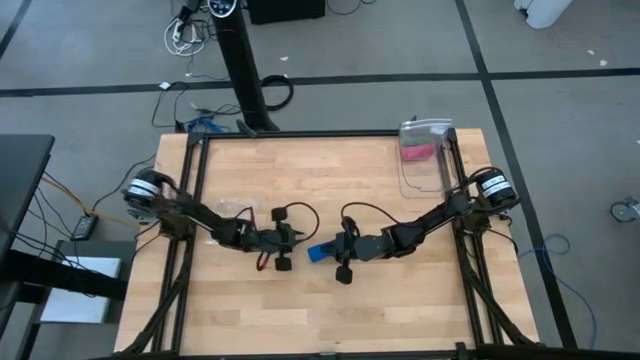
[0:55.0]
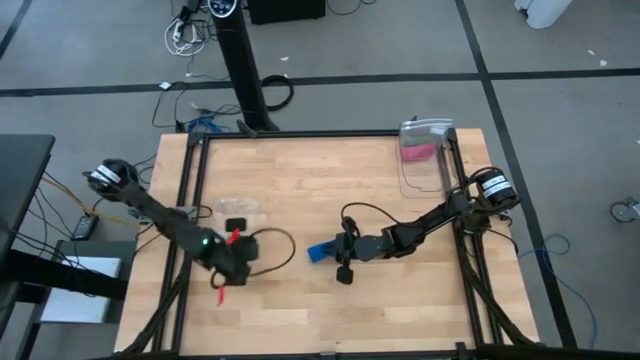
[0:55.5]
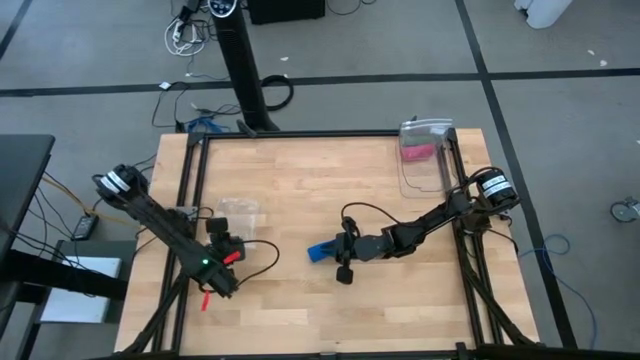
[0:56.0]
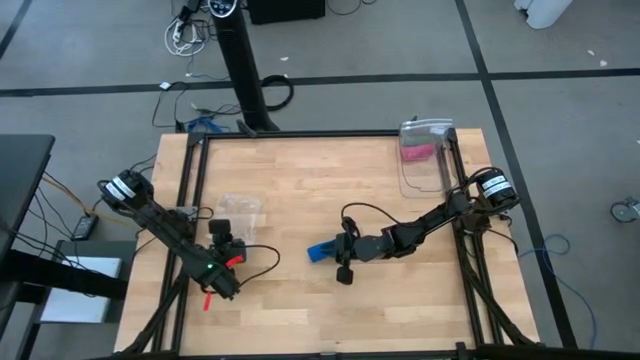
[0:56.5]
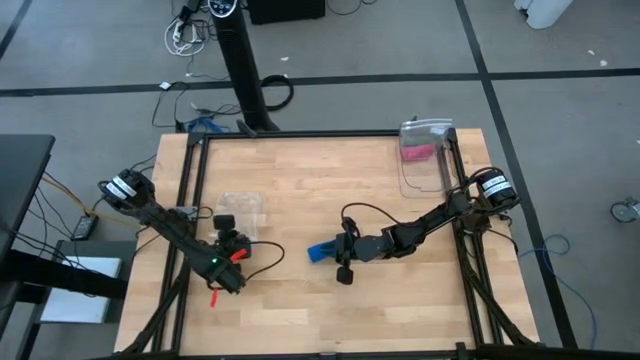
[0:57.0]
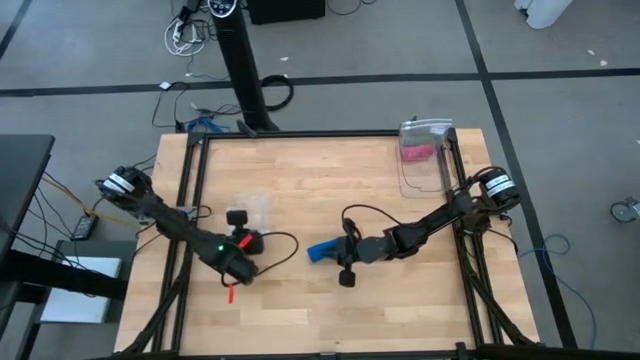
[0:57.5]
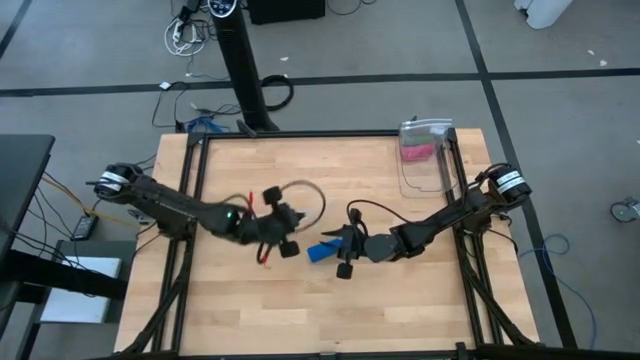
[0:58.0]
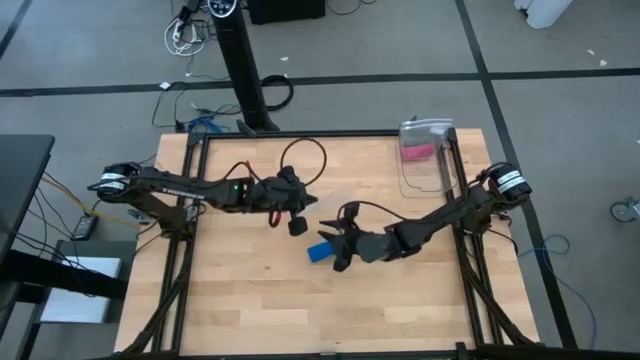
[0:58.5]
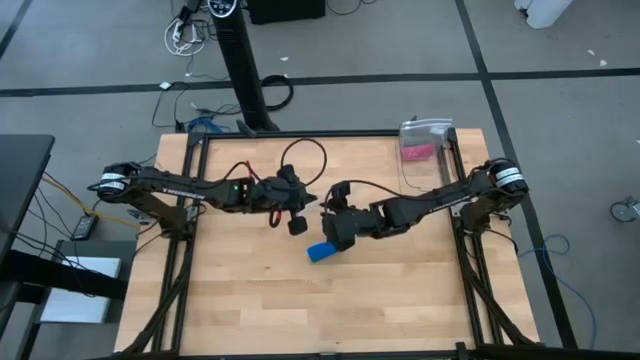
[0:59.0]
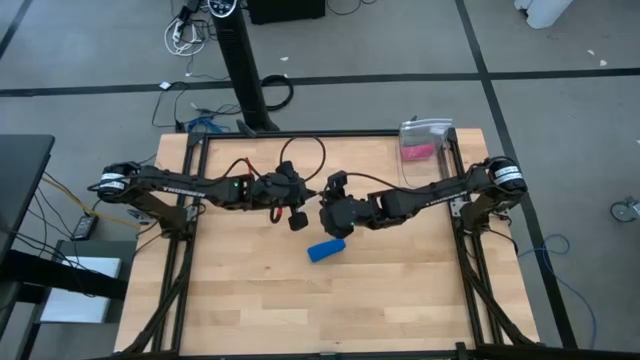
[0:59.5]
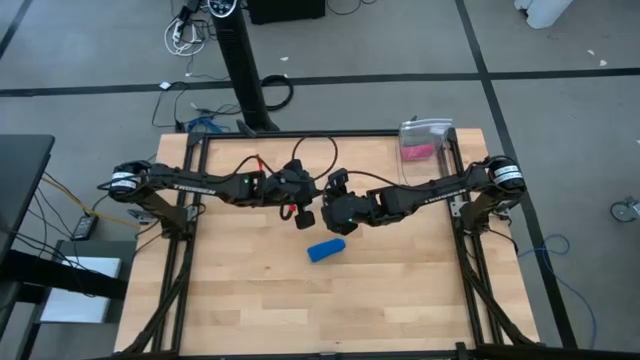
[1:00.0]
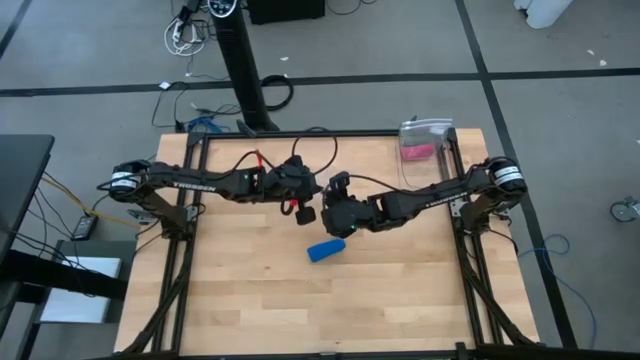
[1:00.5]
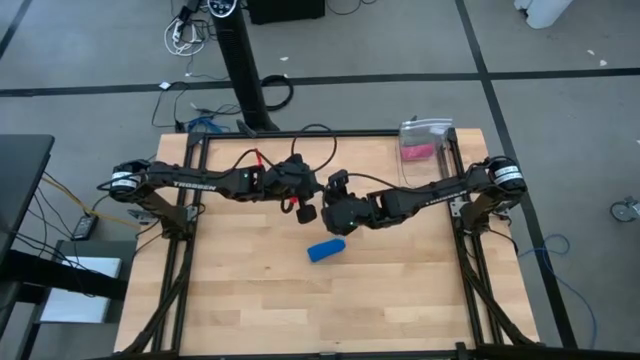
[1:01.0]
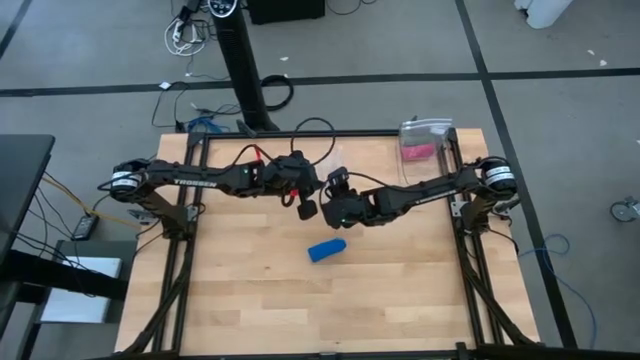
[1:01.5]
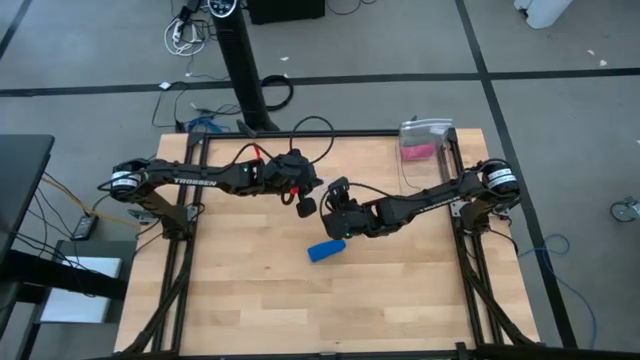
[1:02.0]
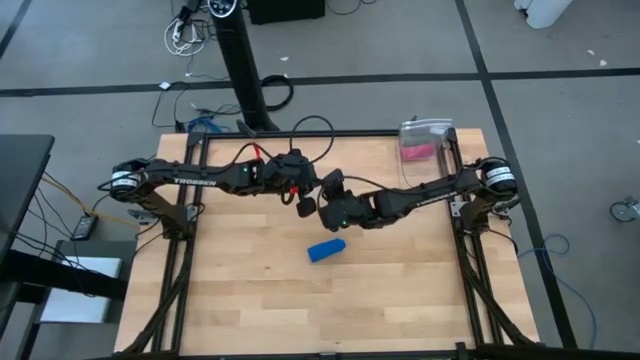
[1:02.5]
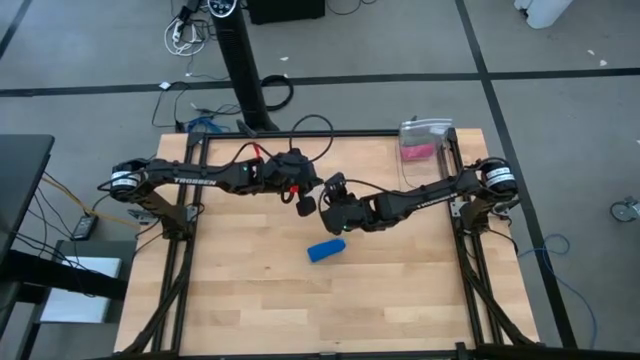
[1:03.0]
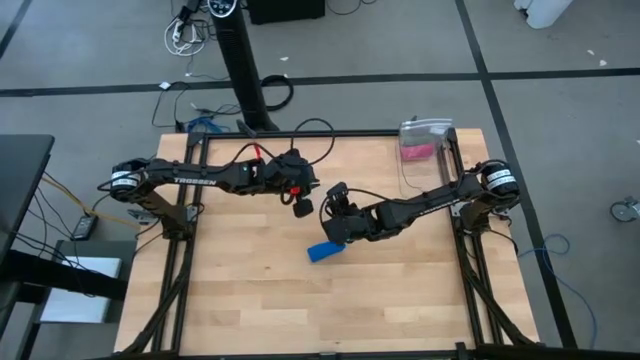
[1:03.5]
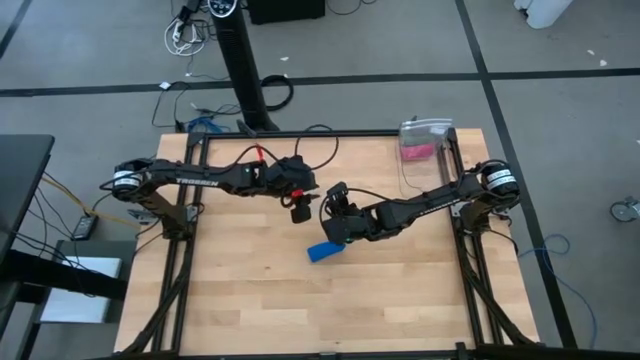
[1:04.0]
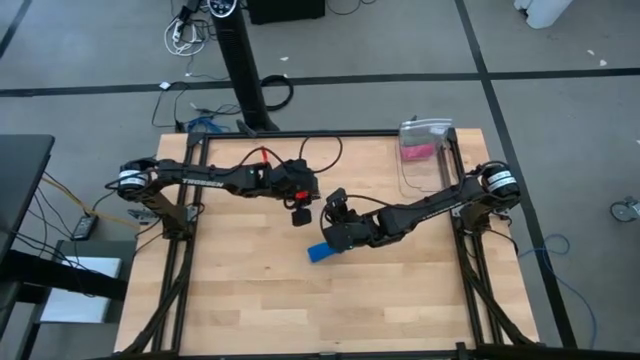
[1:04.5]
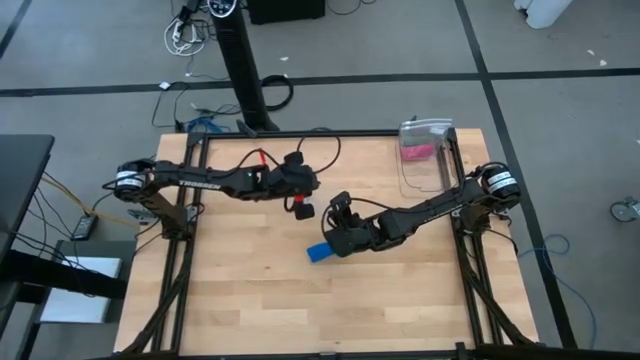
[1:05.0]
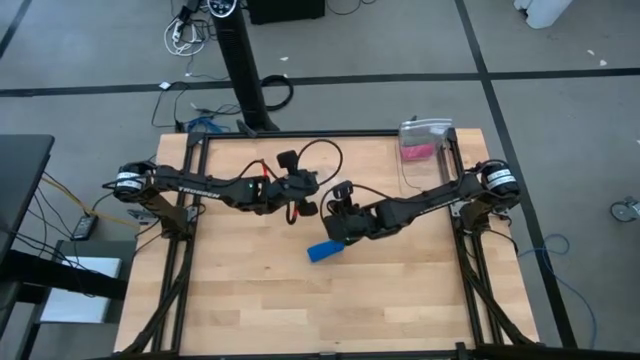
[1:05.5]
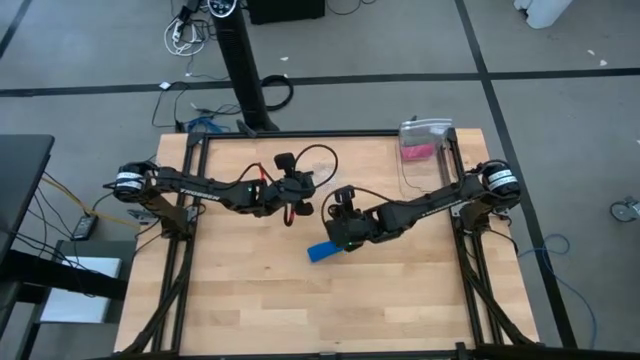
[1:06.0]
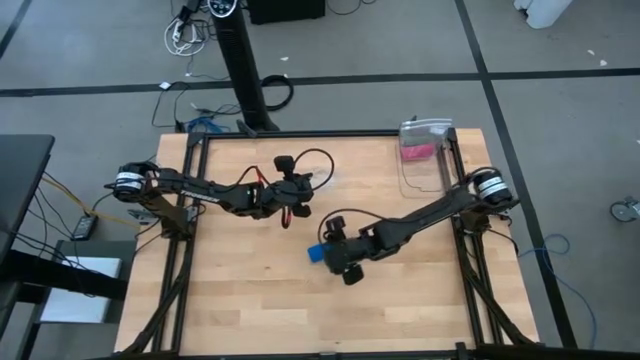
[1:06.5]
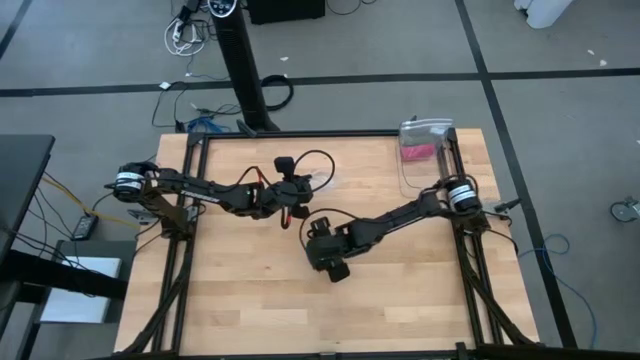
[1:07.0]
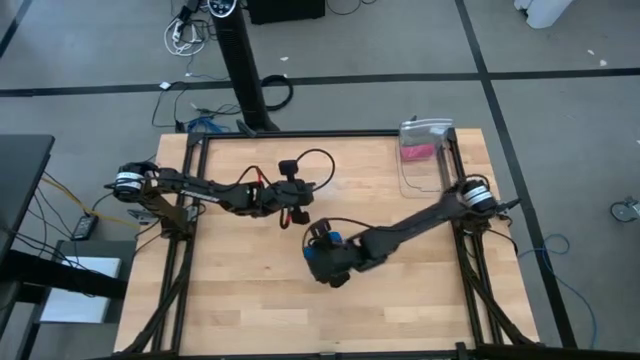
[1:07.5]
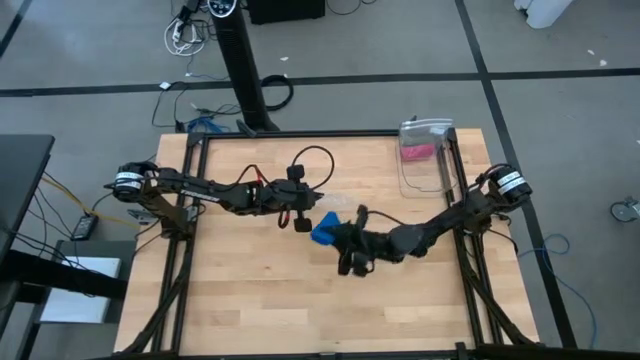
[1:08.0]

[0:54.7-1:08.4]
Task: Roll bandage
Put the blue rolled bandage into the transparent zip bag

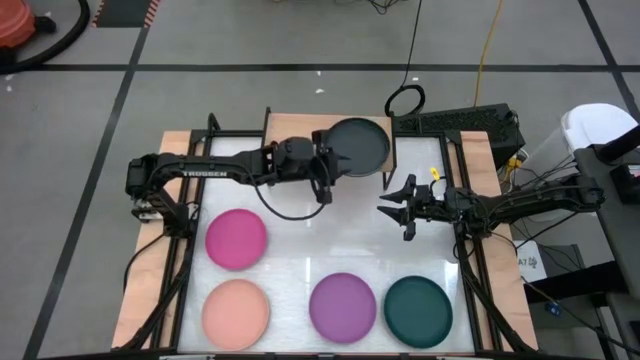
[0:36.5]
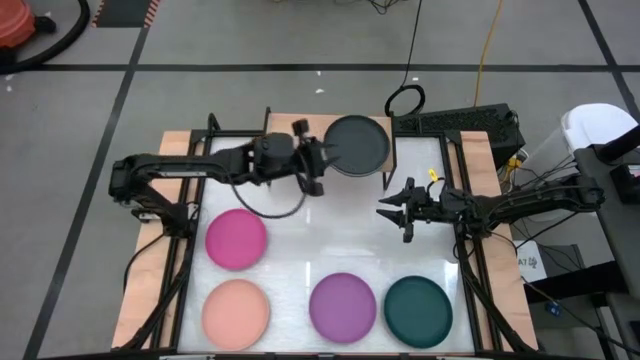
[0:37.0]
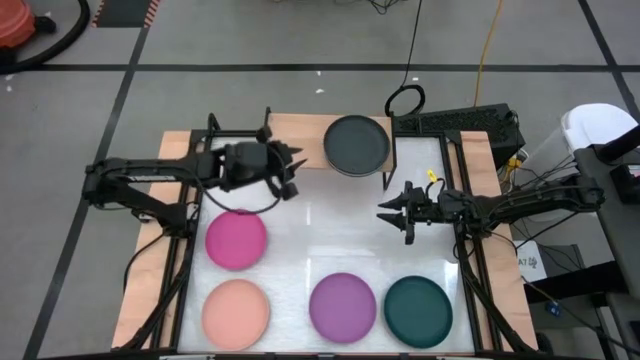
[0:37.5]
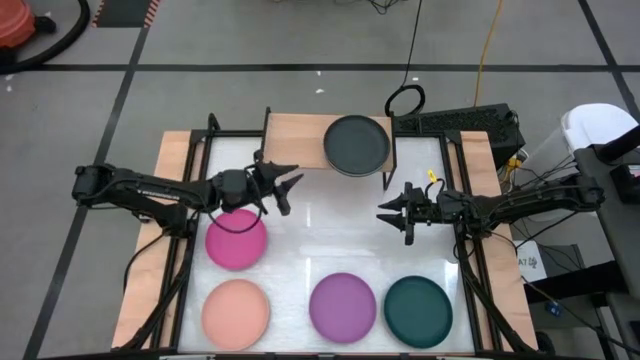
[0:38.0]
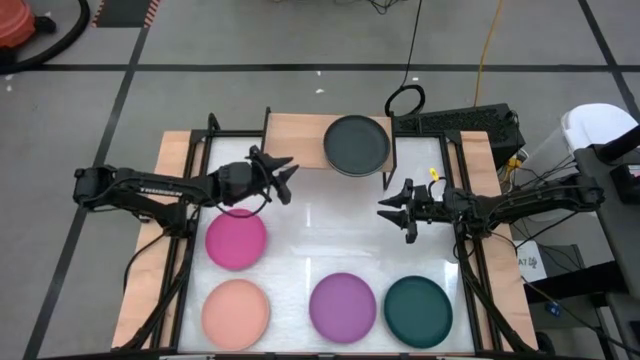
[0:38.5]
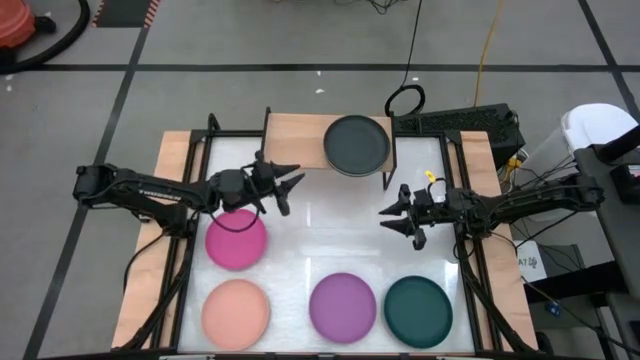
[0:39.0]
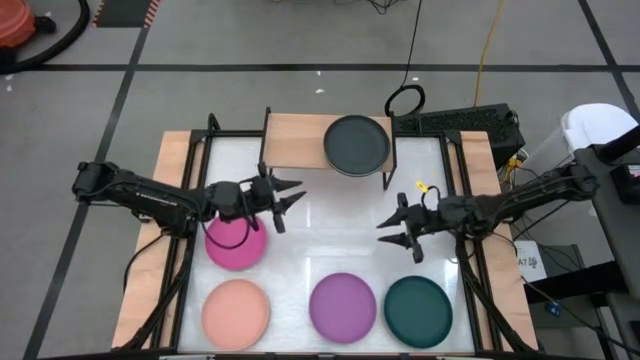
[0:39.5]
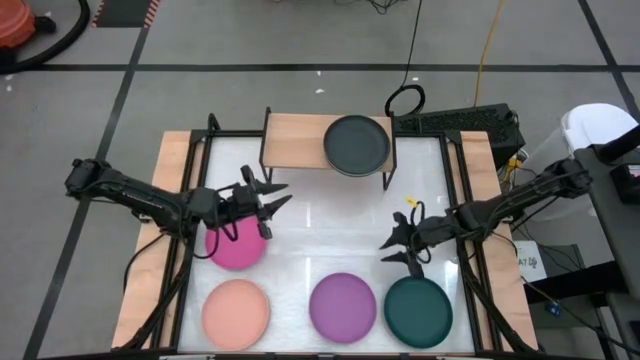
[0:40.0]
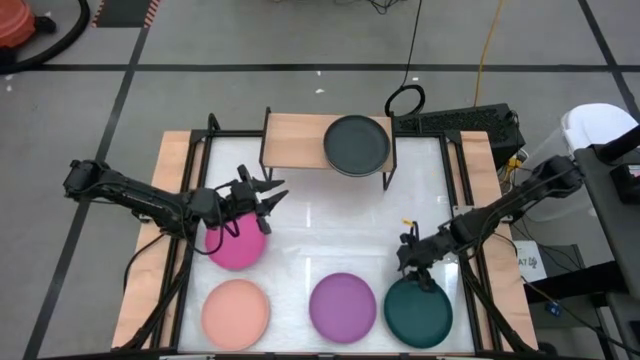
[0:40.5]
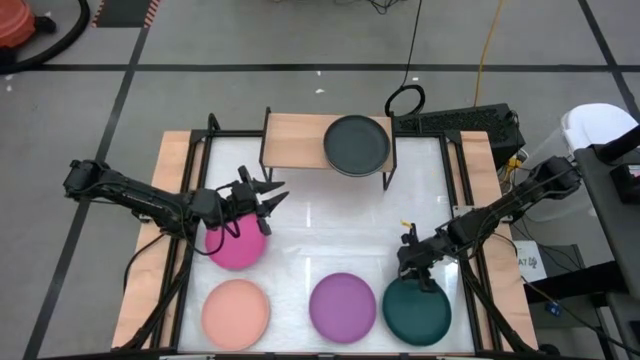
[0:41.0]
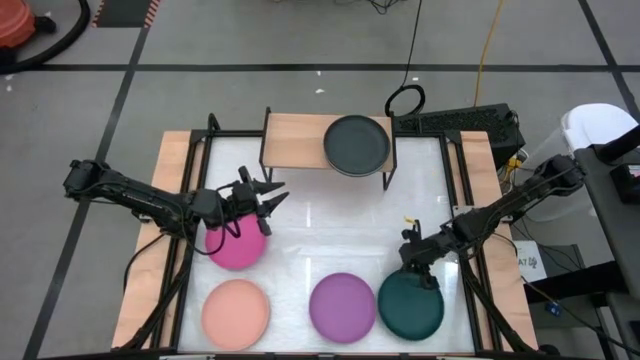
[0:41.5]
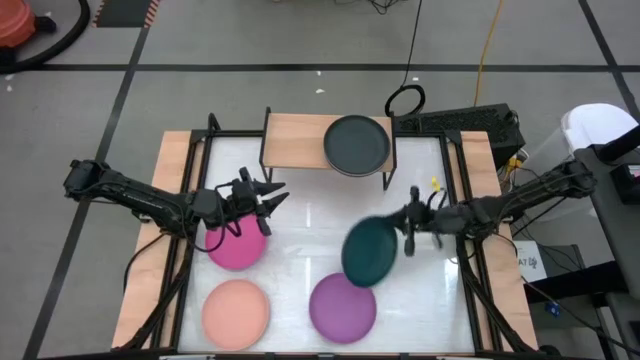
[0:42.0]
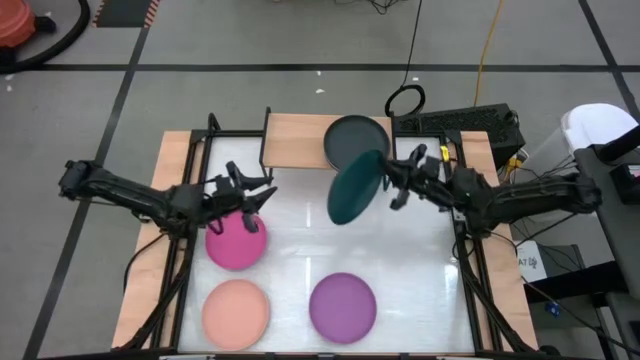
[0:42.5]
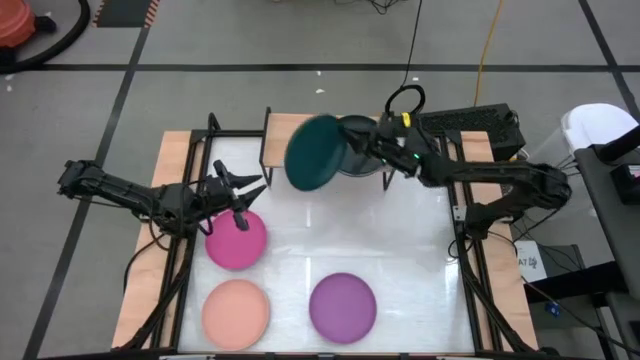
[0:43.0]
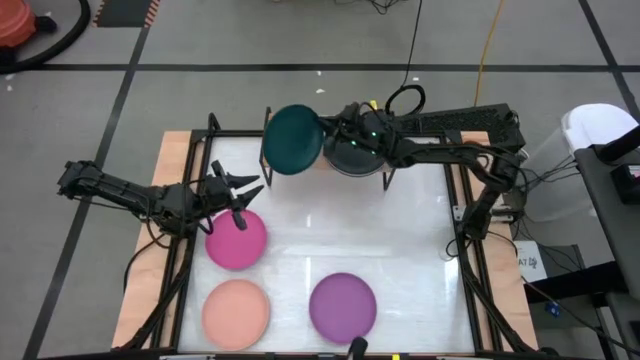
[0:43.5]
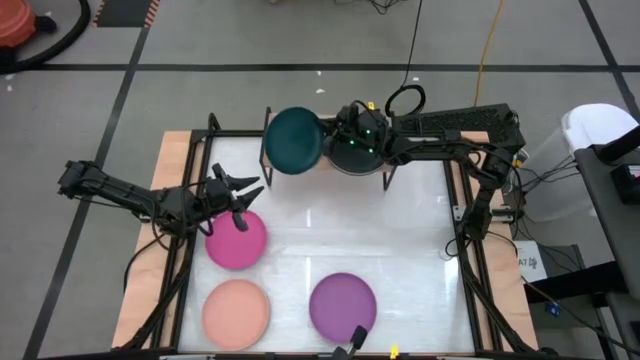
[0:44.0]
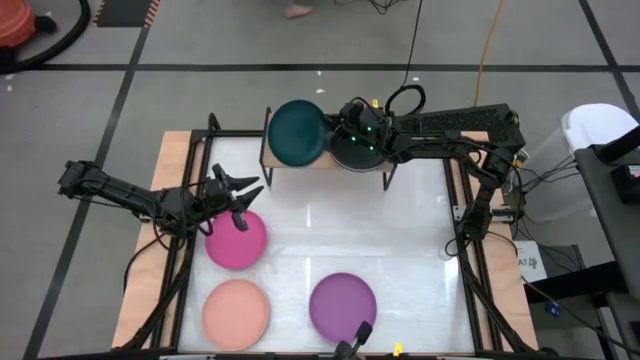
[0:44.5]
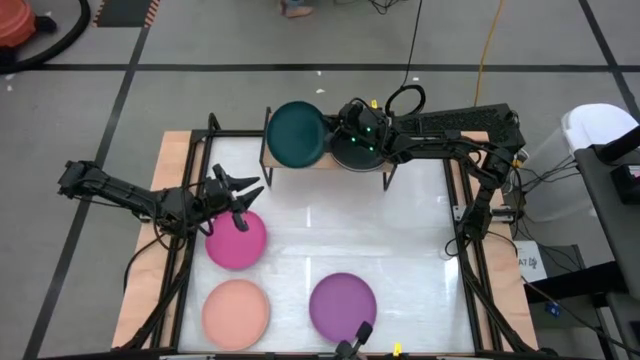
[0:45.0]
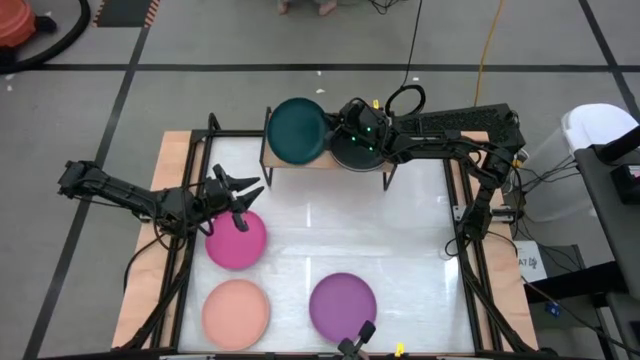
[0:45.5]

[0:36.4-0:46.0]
Task: Place and stack plates onto a shelf
Put the green plate on the shelf
